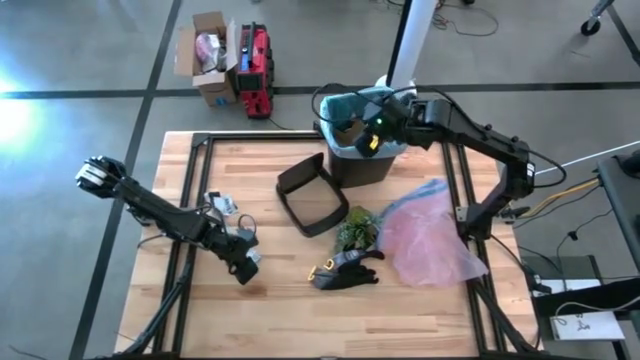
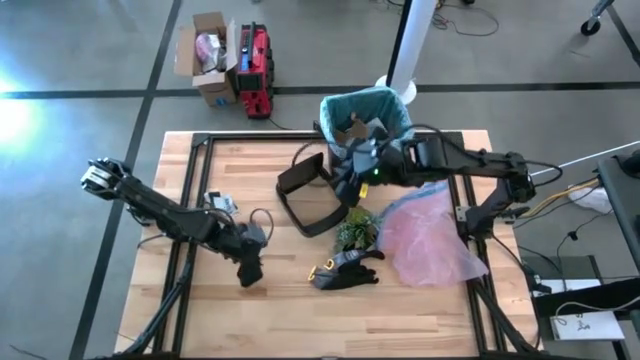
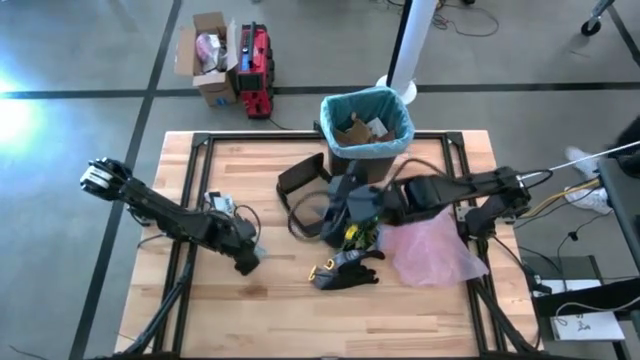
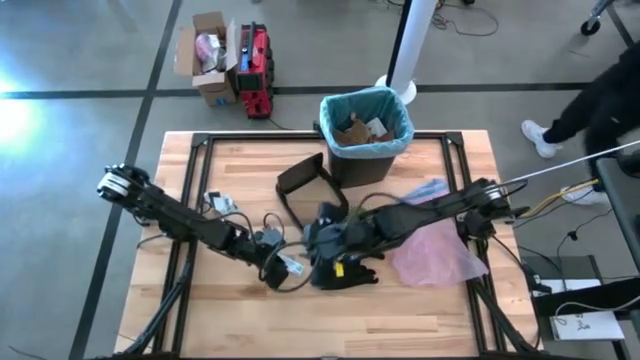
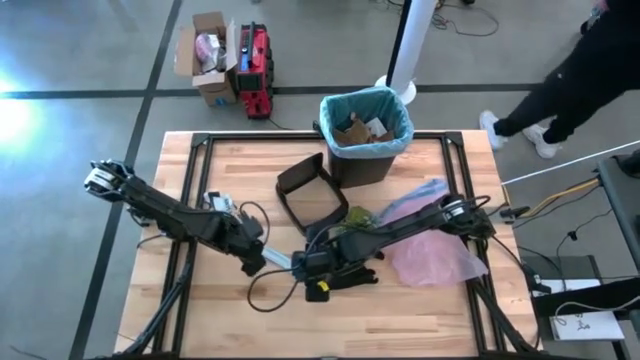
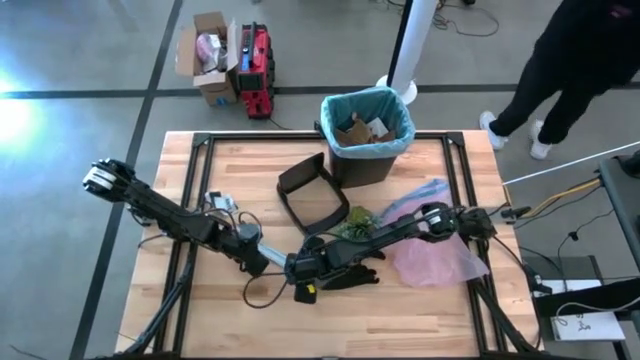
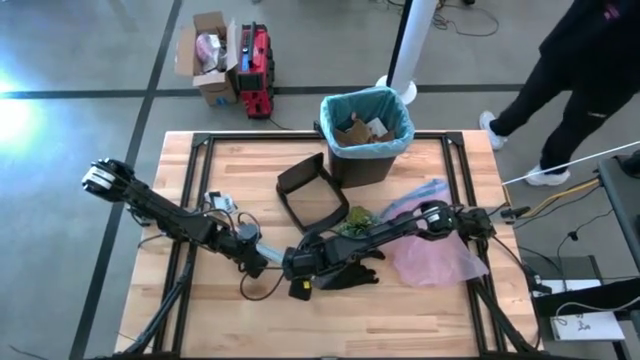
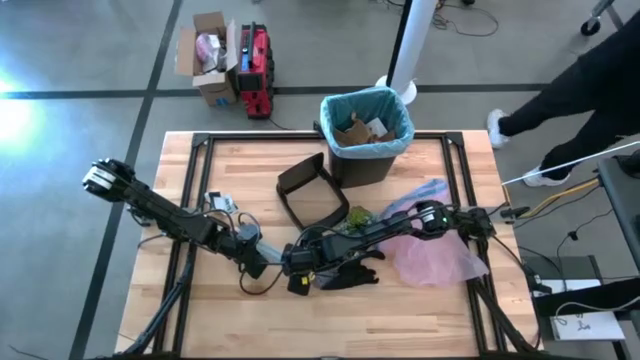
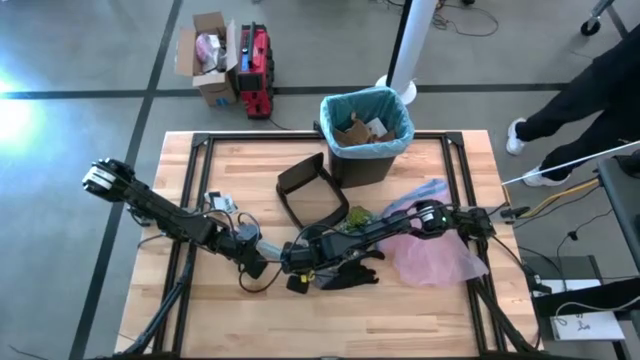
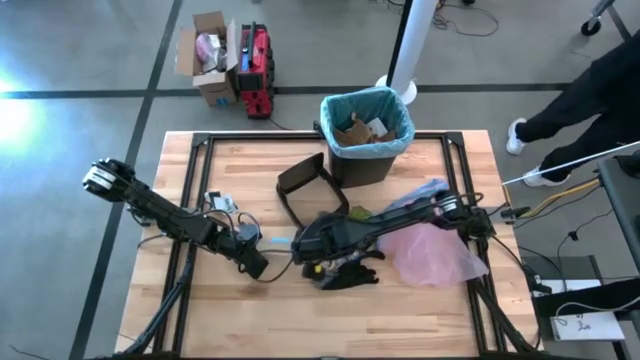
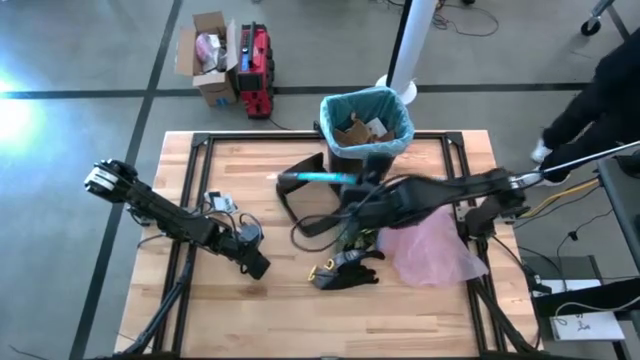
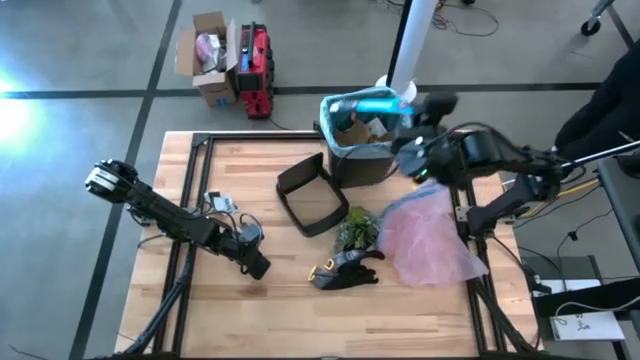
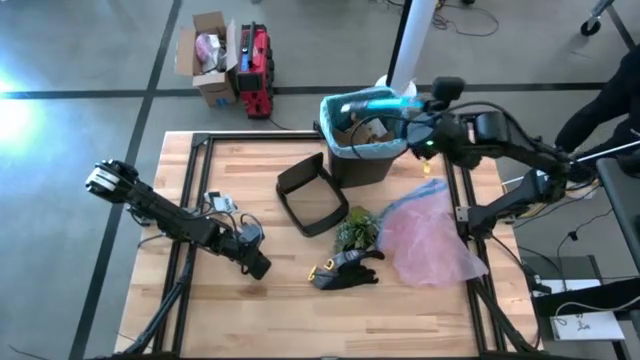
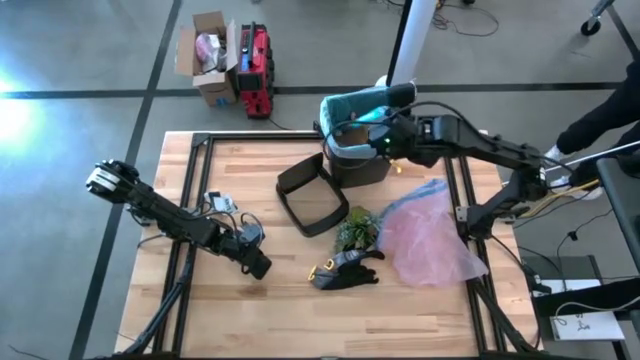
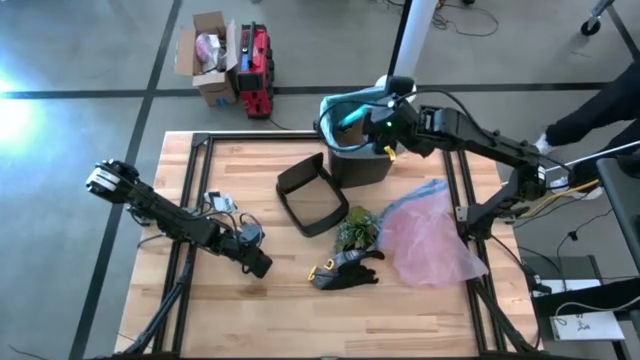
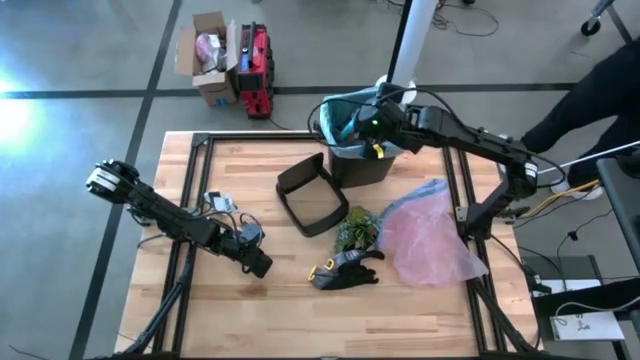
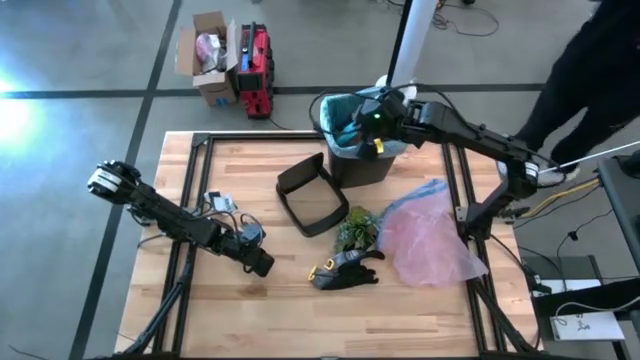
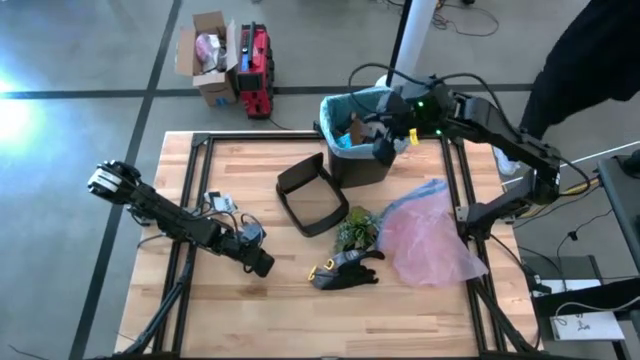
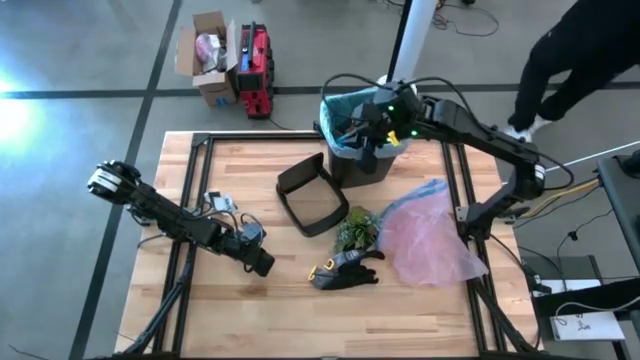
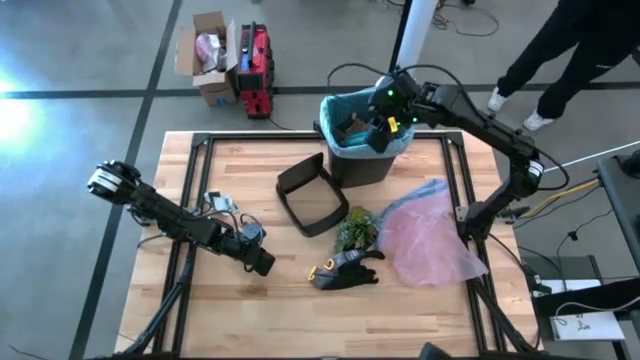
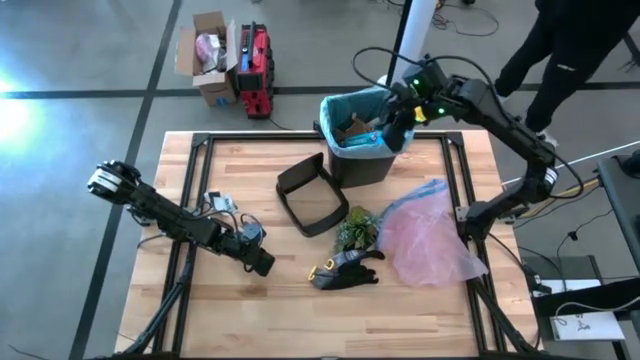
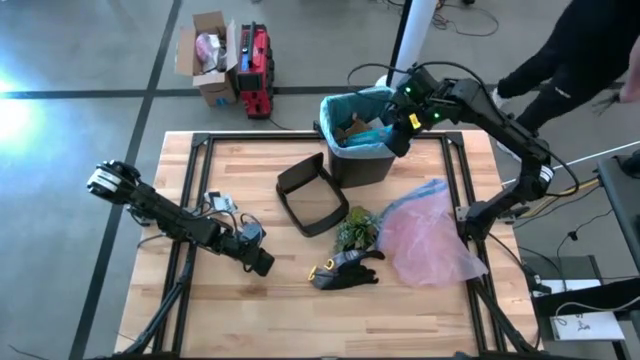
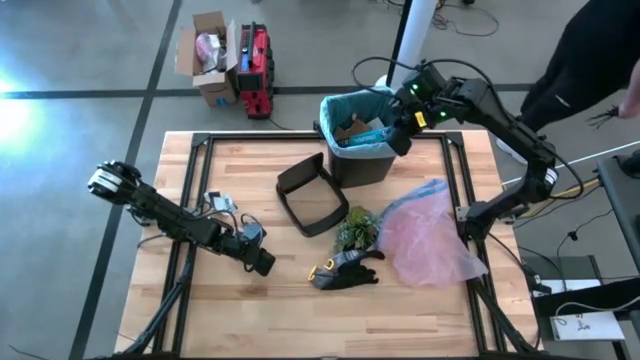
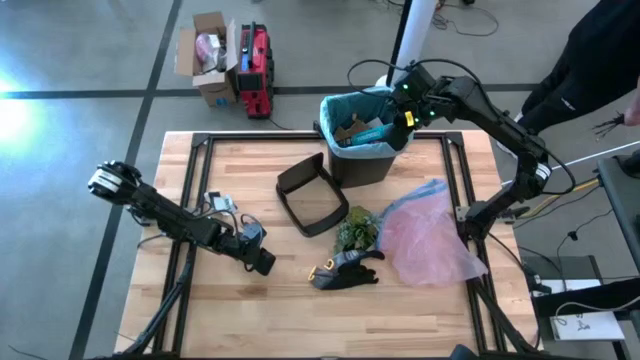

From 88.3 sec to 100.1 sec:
Task: place trash/remove bag and relplace
Put the plastic packaging into the trash bin

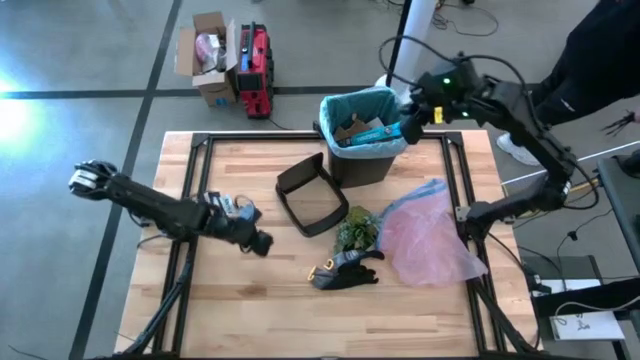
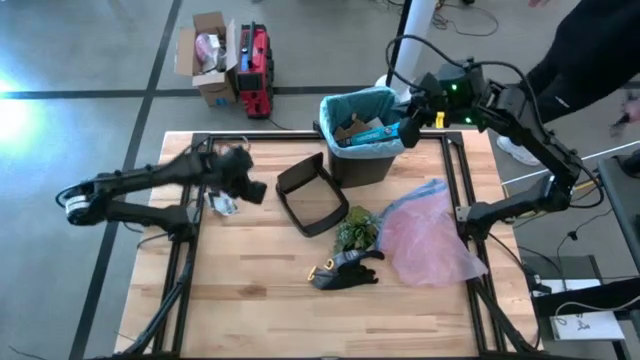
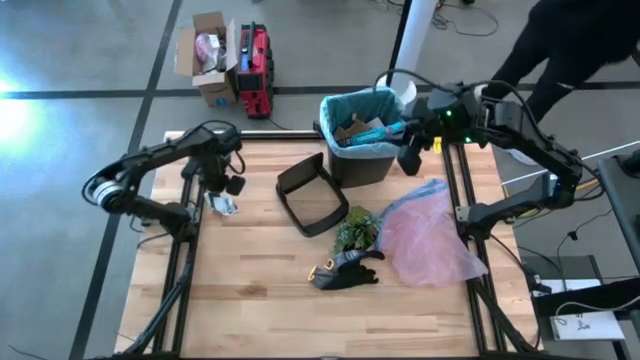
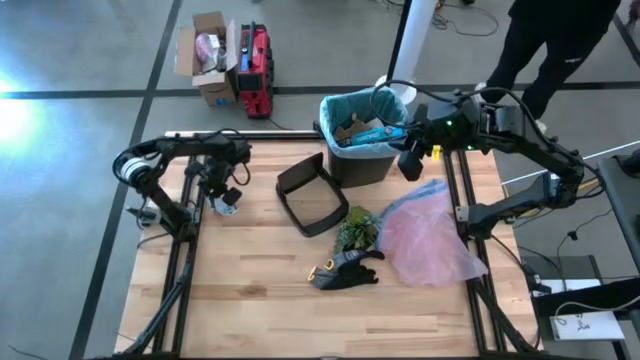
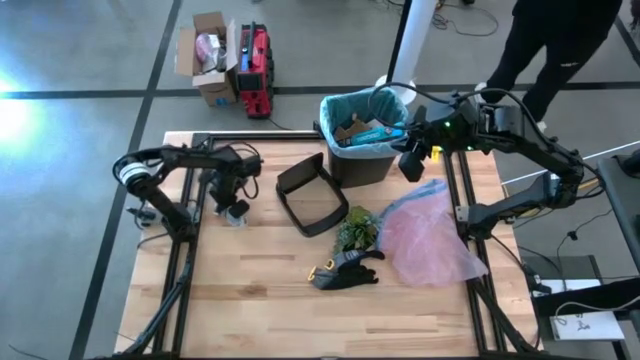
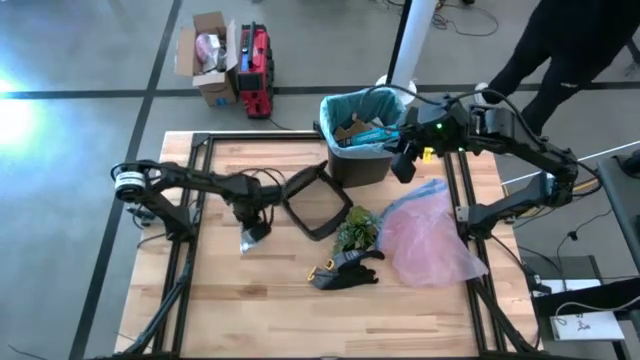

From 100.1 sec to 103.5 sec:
Move the white papers to the center of the table

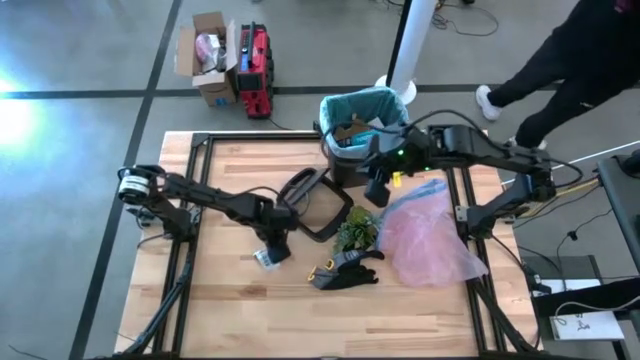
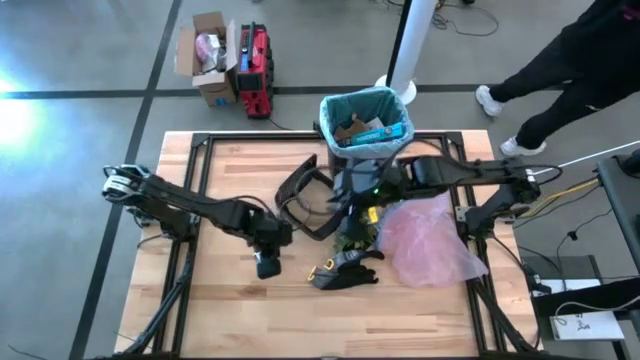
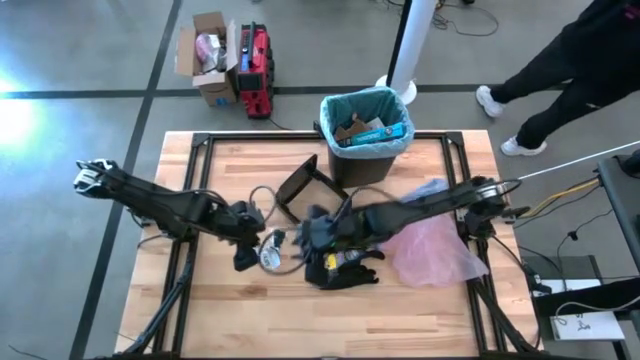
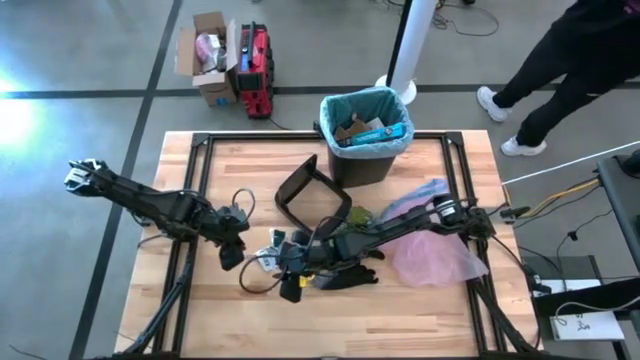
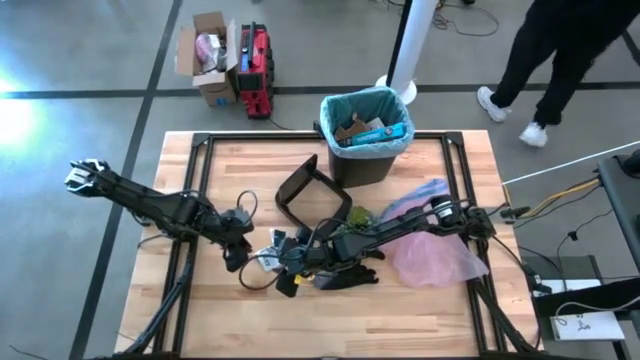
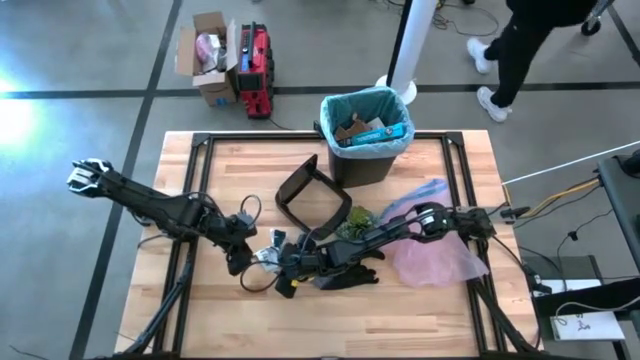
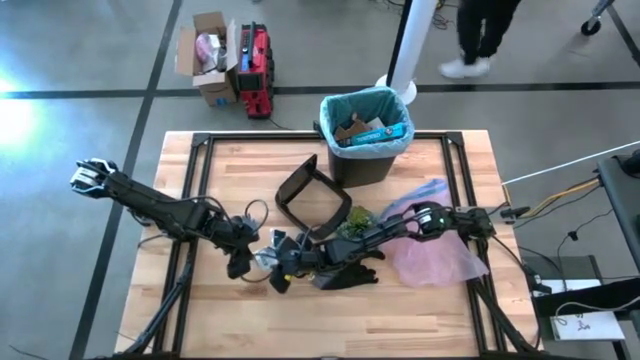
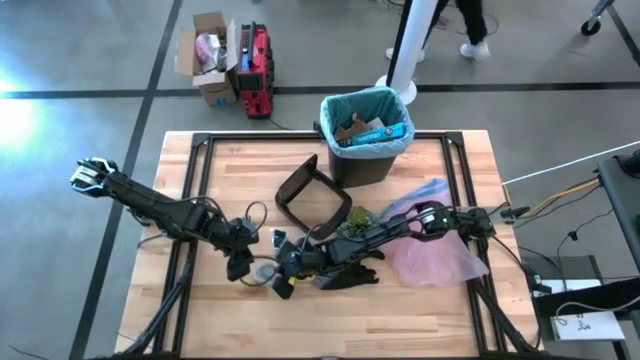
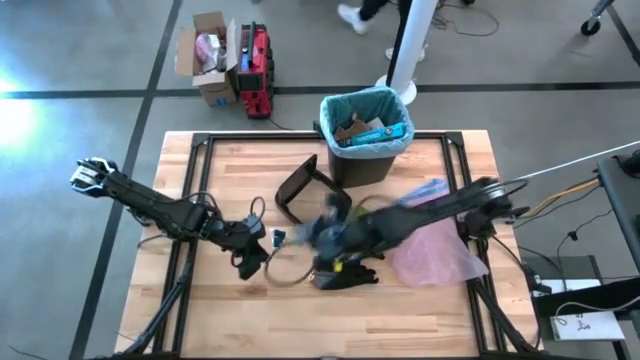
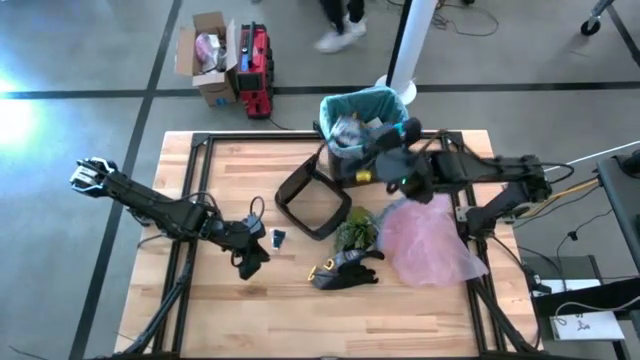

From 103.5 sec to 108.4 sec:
Put the white paper into the trash bin
